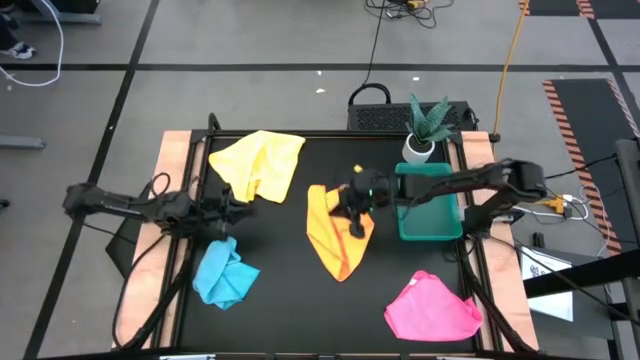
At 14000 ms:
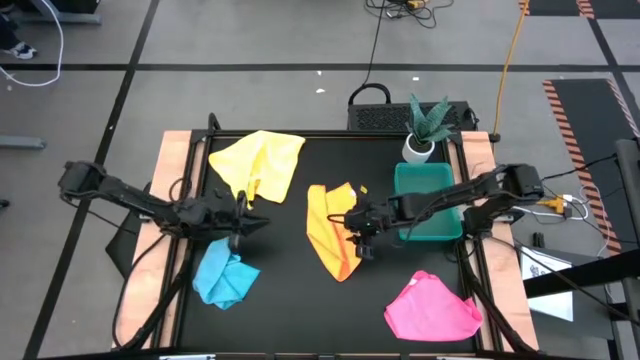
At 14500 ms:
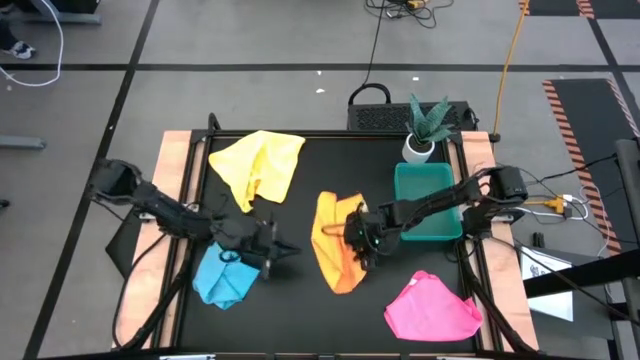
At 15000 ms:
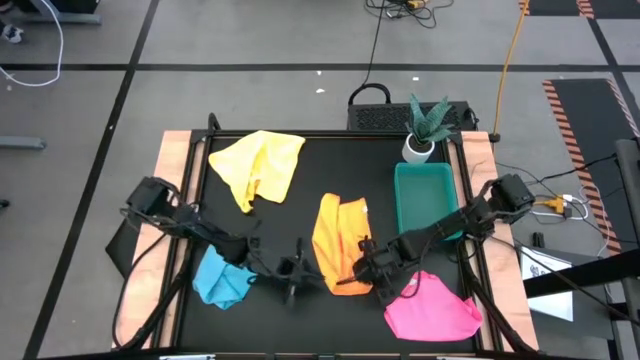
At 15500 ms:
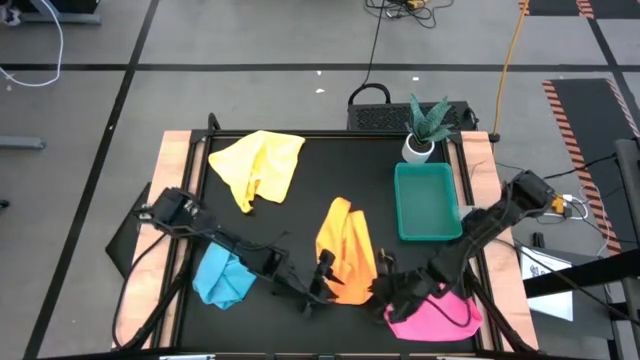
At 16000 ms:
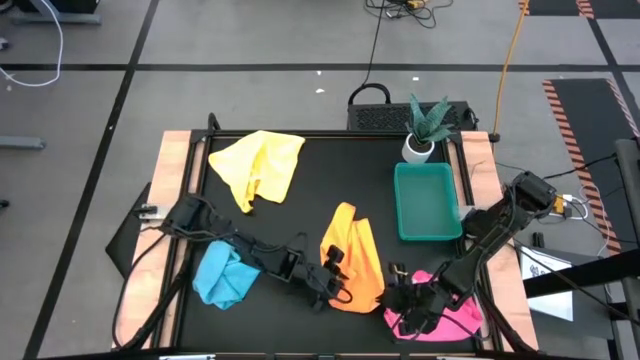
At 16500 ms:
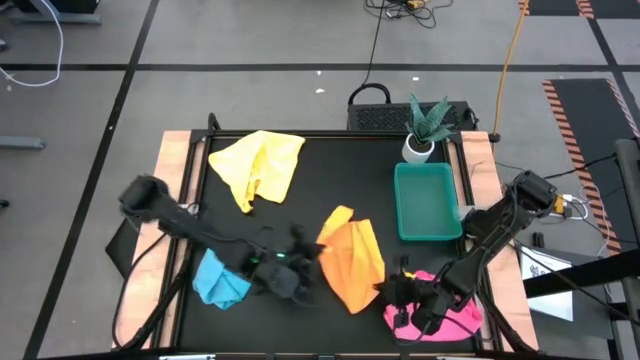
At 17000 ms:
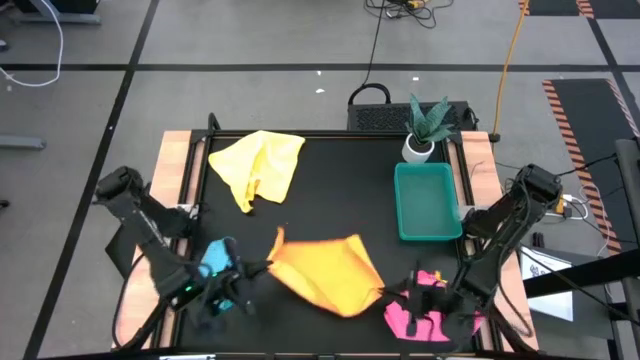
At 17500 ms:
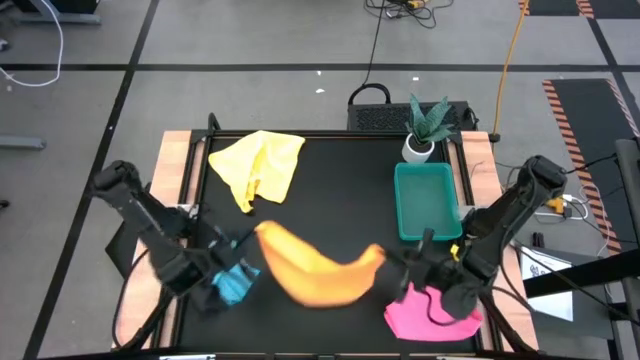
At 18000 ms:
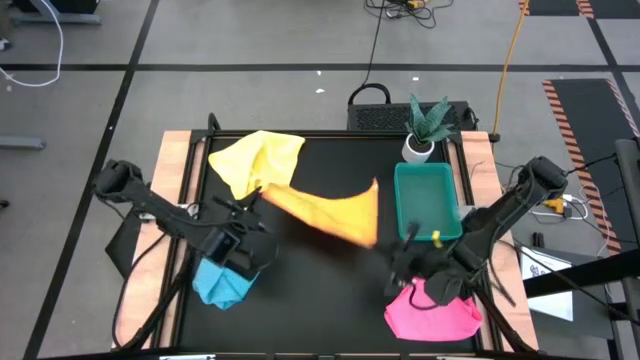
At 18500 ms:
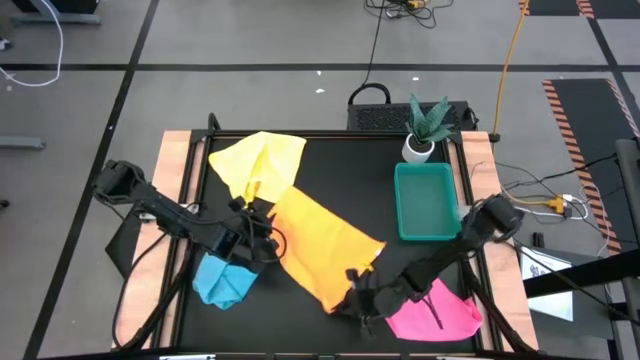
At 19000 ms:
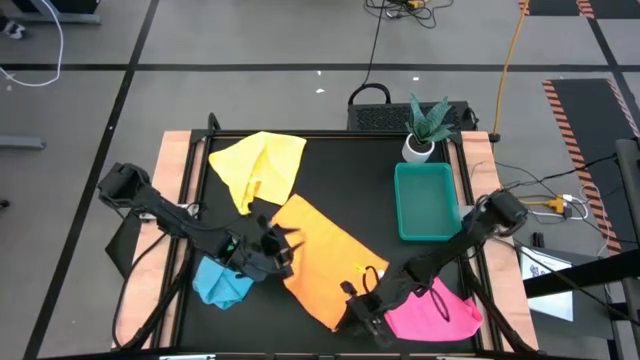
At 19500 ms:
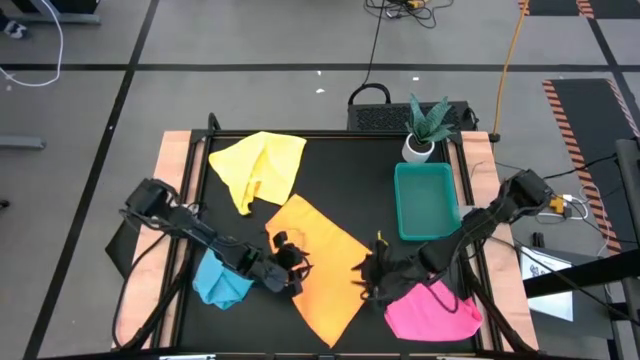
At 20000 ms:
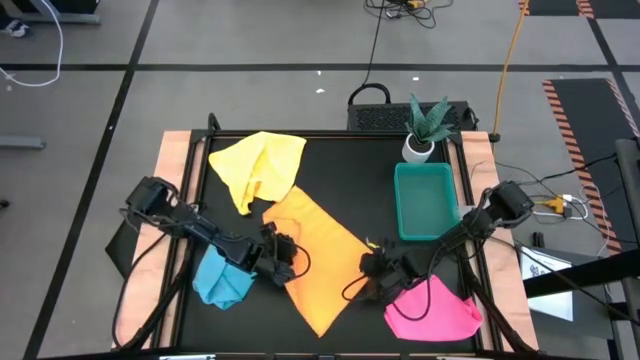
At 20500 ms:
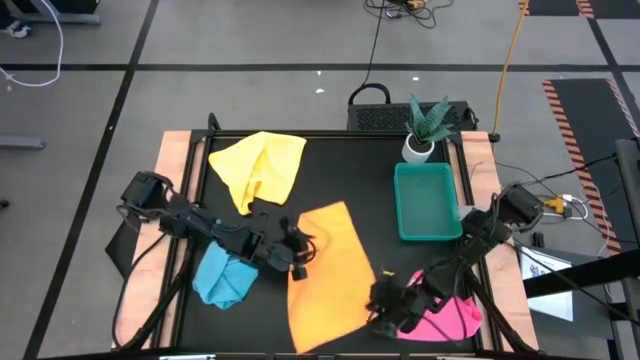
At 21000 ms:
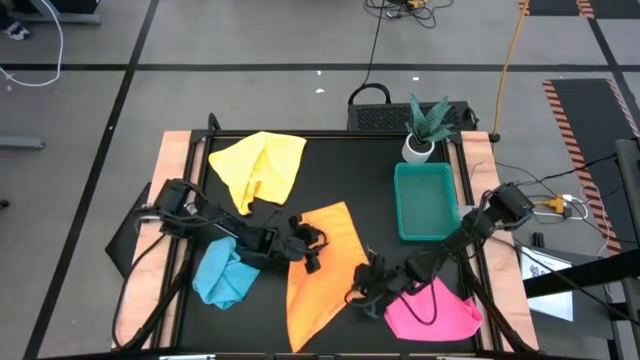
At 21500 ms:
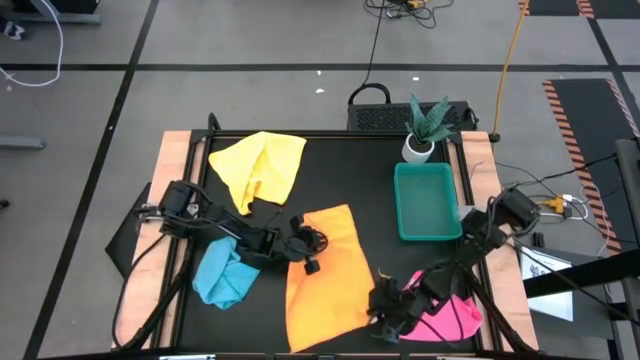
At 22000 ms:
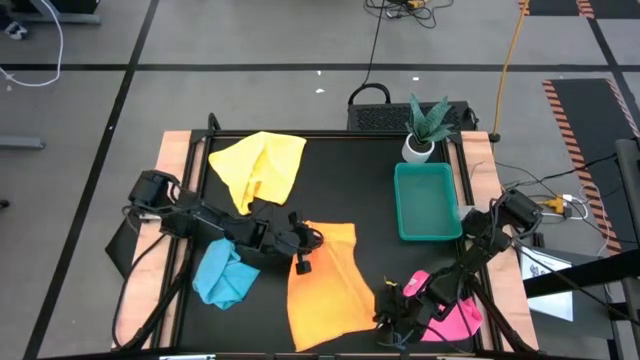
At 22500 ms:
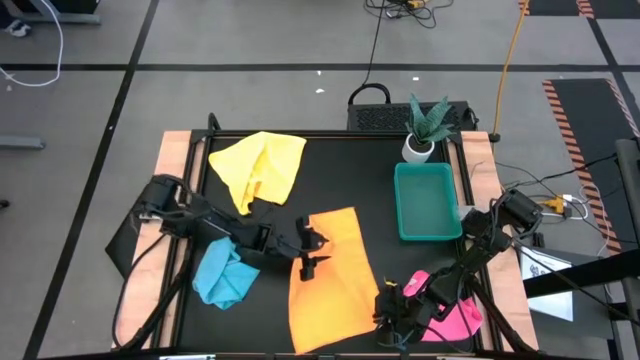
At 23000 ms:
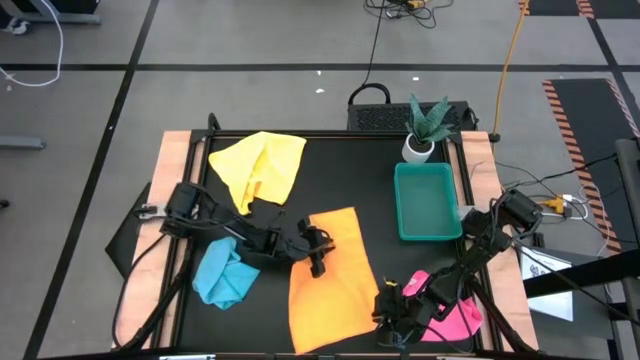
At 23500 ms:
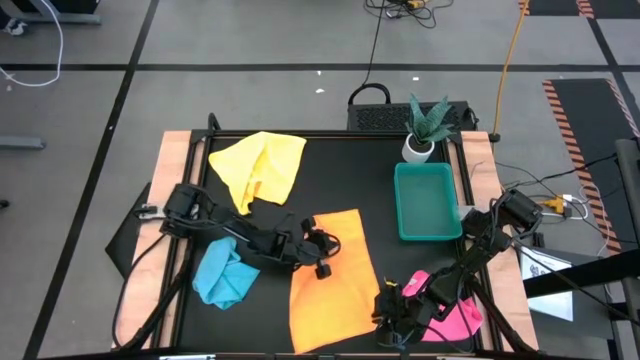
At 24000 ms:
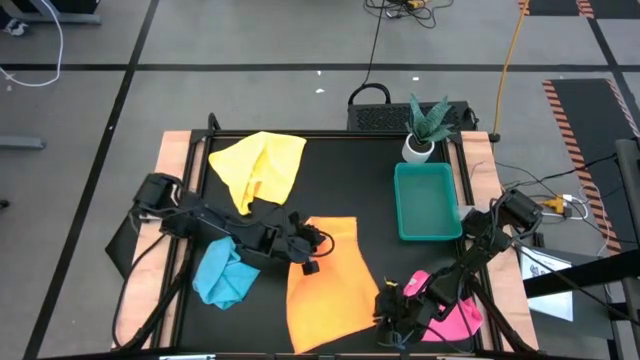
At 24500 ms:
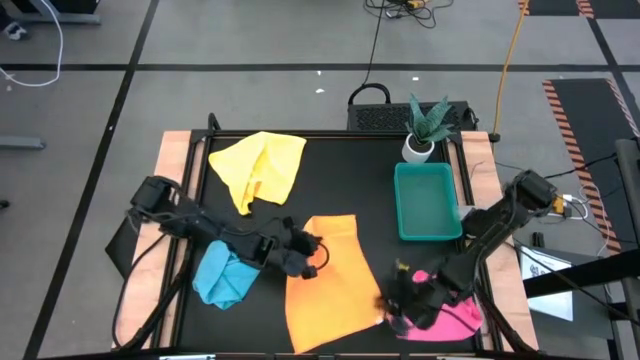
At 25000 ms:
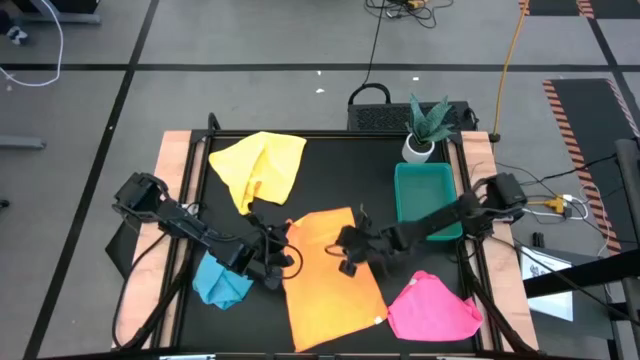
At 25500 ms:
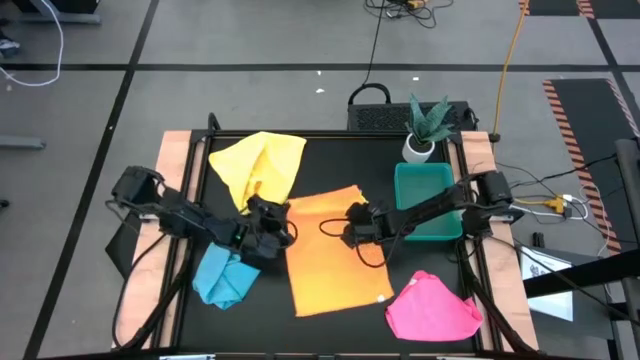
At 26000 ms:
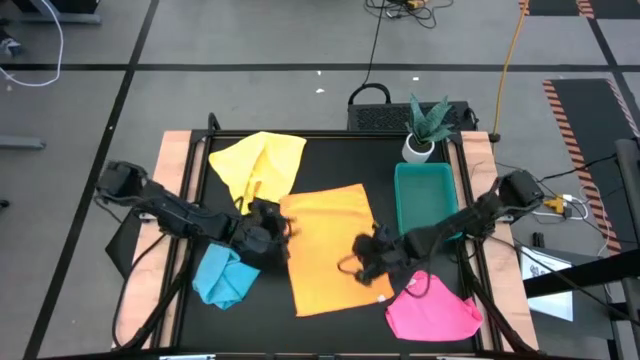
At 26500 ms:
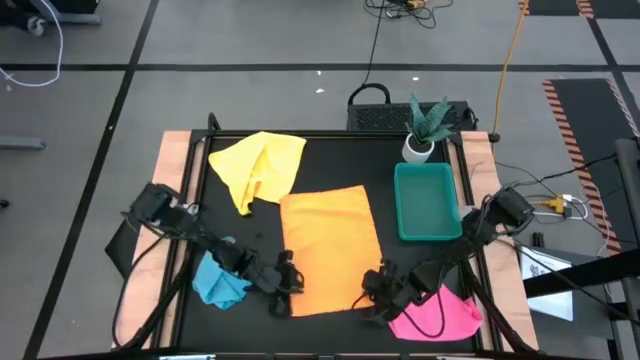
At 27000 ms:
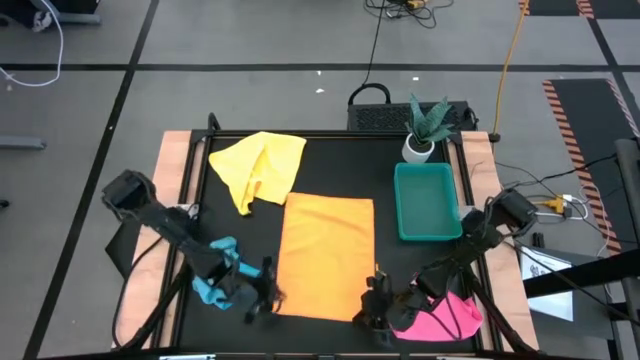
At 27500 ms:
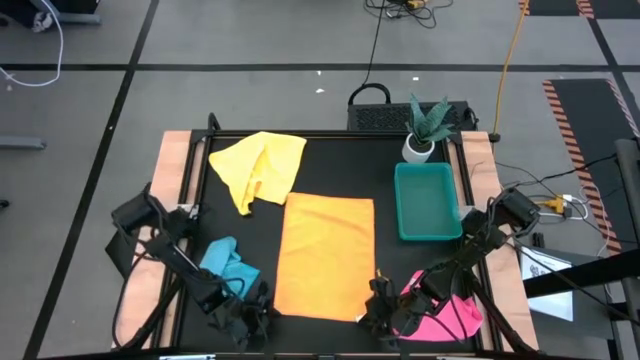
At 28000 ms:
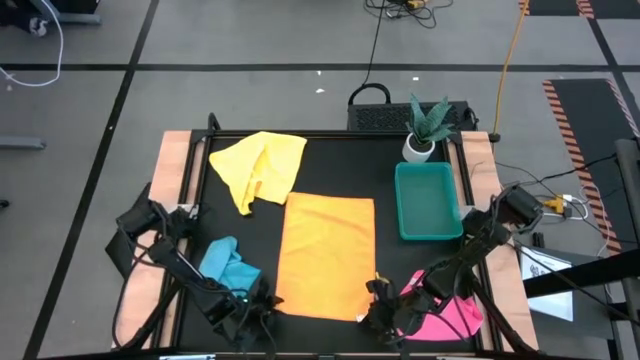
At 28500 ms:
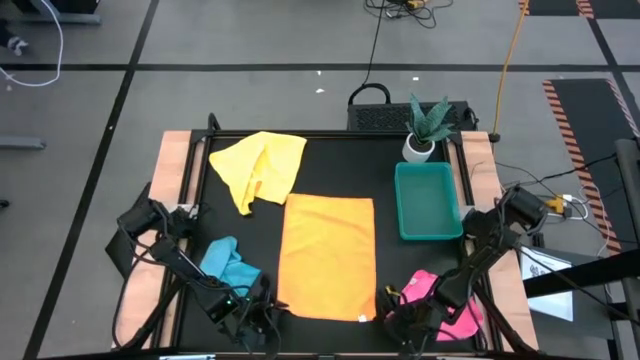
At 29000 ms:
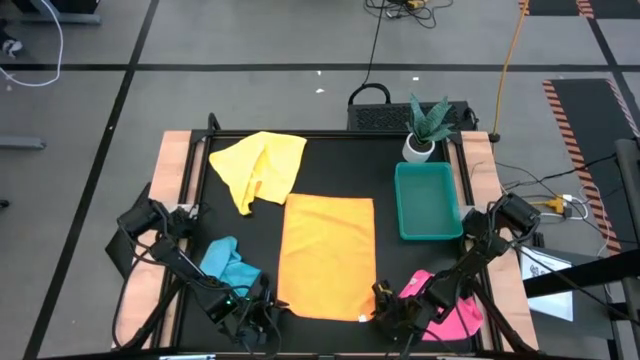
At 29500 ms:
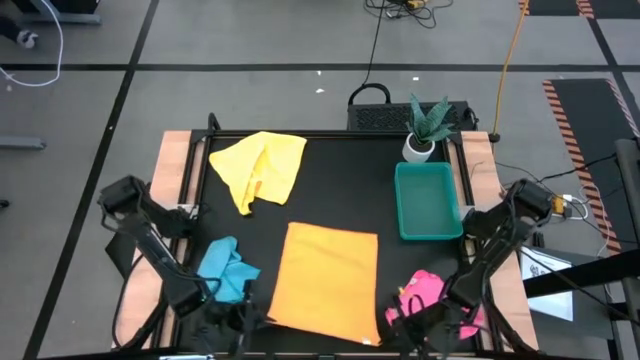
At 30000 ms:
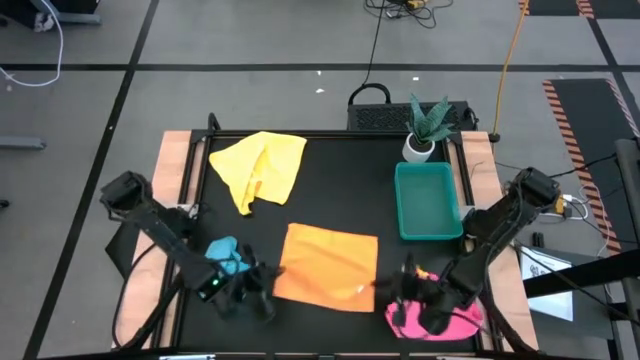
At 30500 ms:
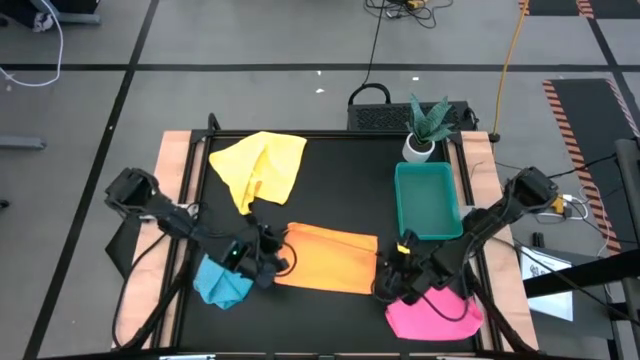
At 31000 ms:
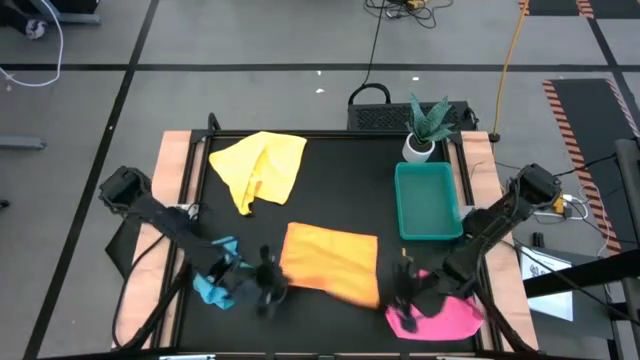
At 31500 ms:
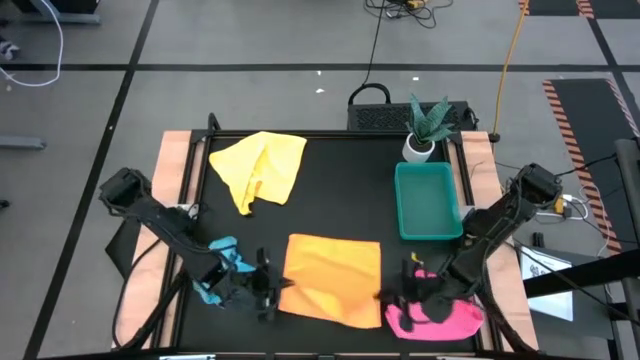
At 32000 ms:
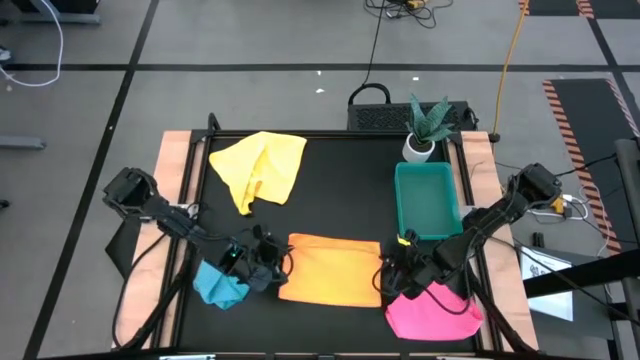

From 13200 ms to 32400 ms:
Task: Fold microfiber towels
Fold the orange microfiber cloth
